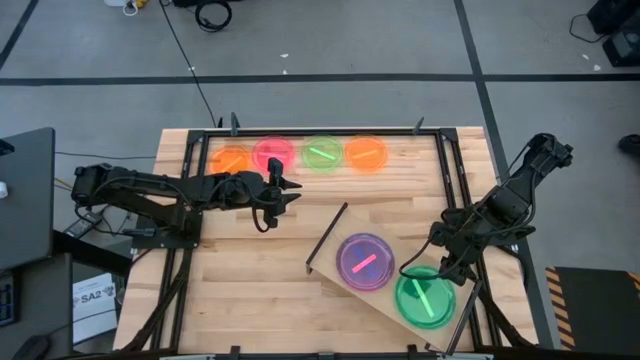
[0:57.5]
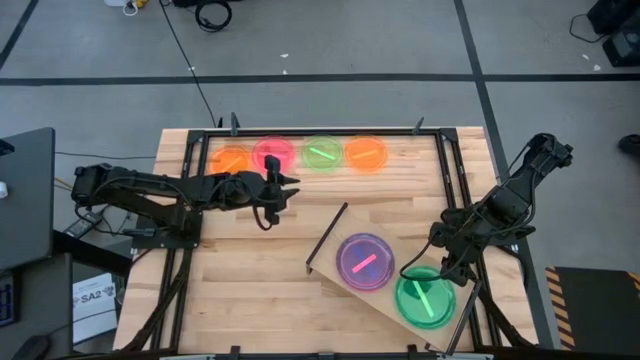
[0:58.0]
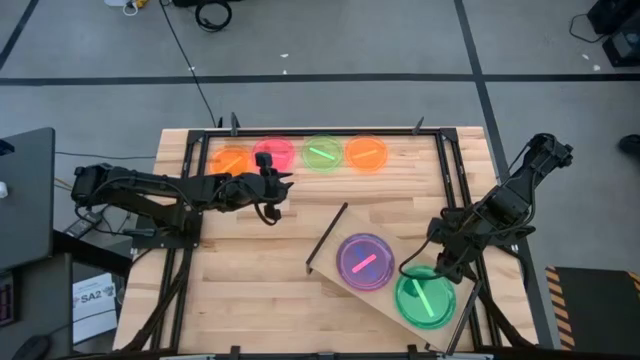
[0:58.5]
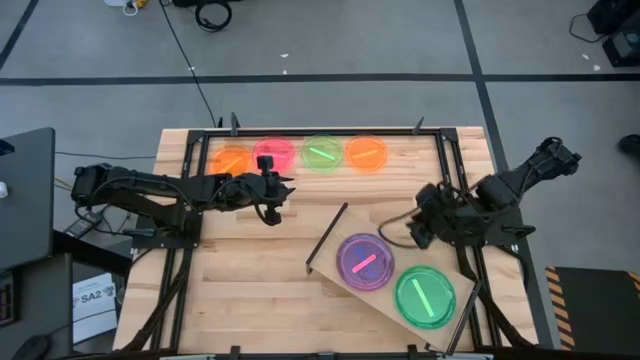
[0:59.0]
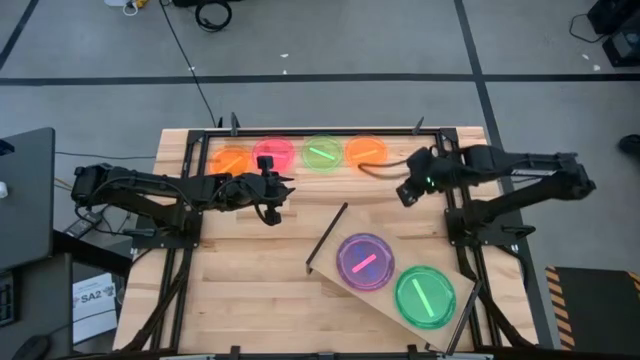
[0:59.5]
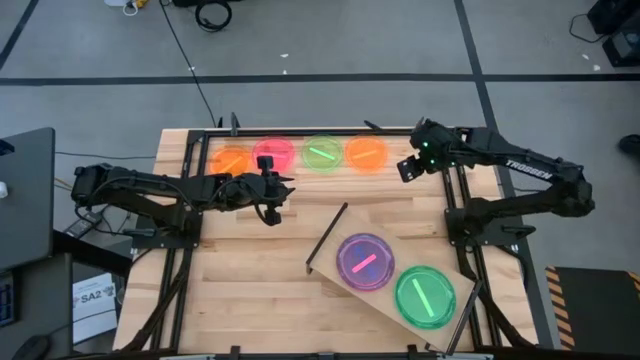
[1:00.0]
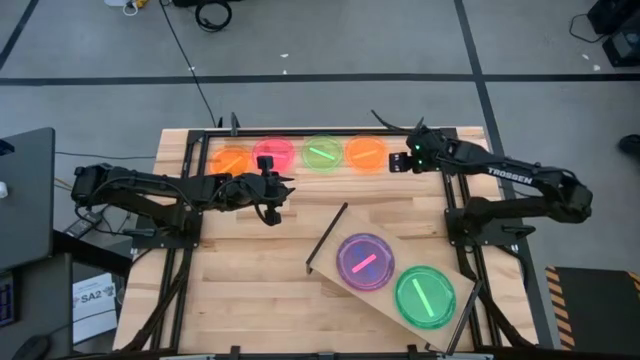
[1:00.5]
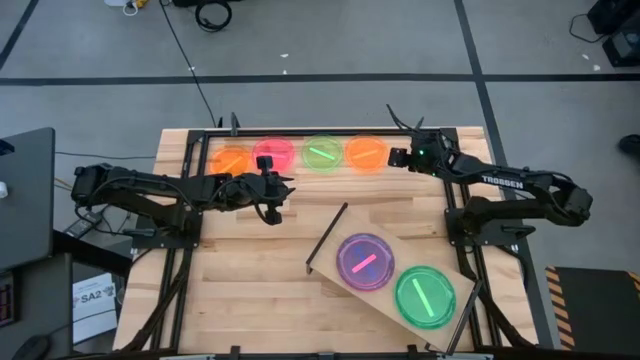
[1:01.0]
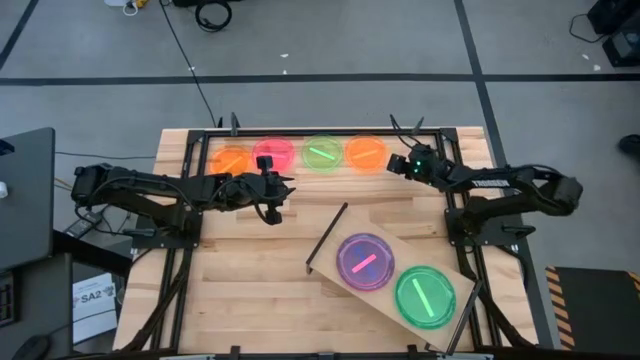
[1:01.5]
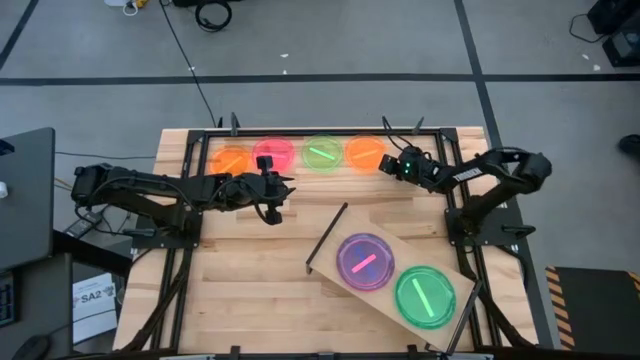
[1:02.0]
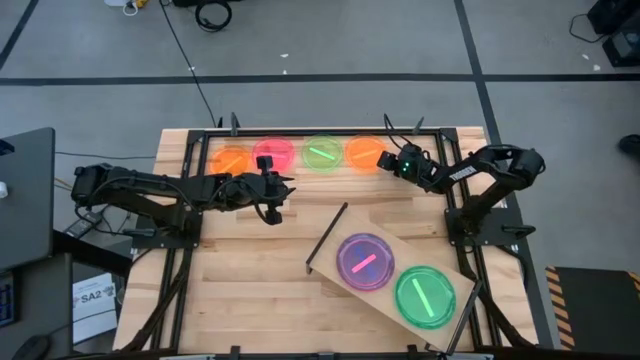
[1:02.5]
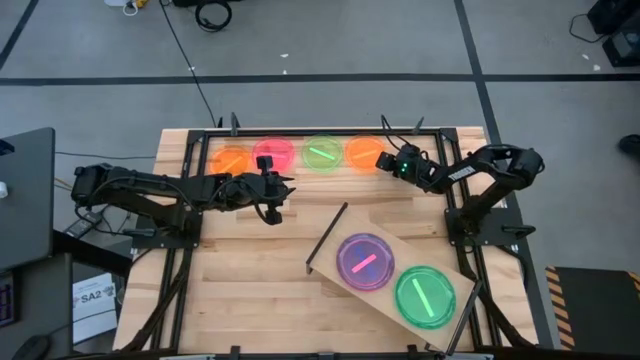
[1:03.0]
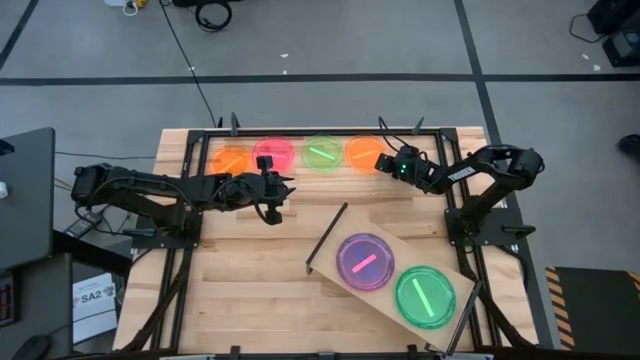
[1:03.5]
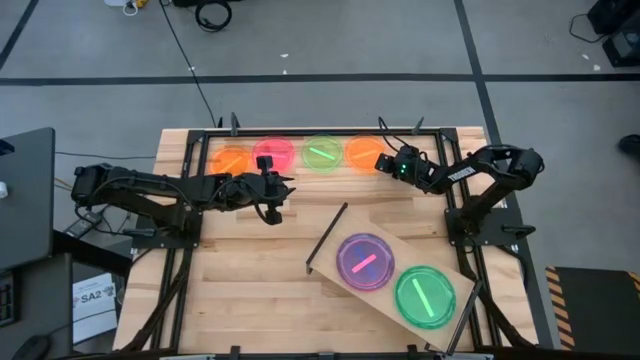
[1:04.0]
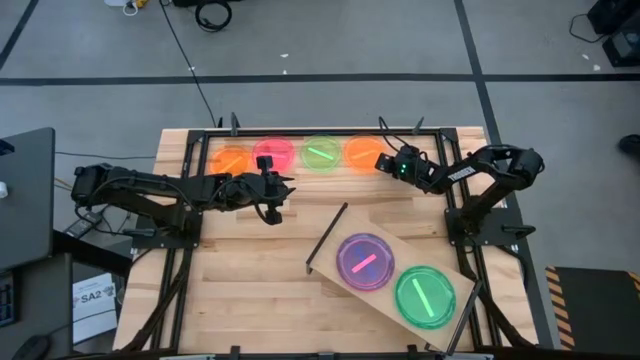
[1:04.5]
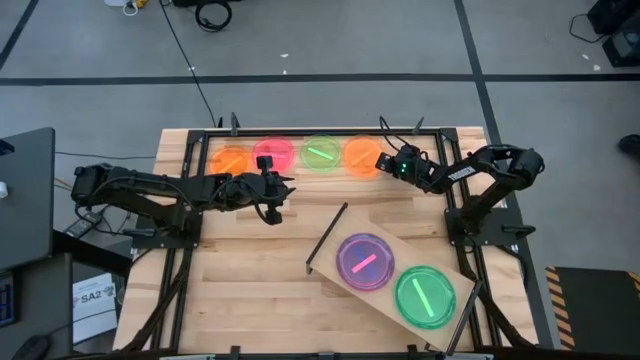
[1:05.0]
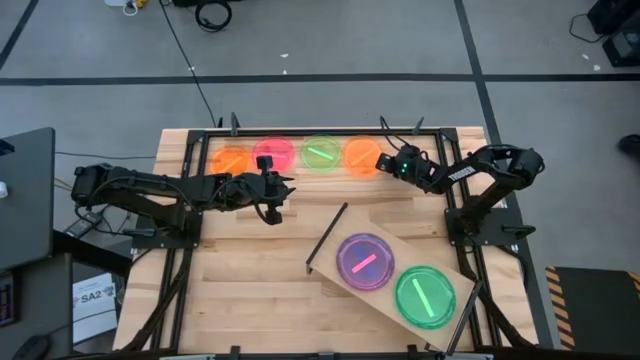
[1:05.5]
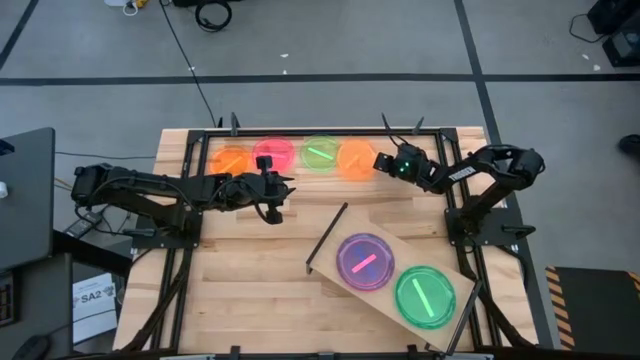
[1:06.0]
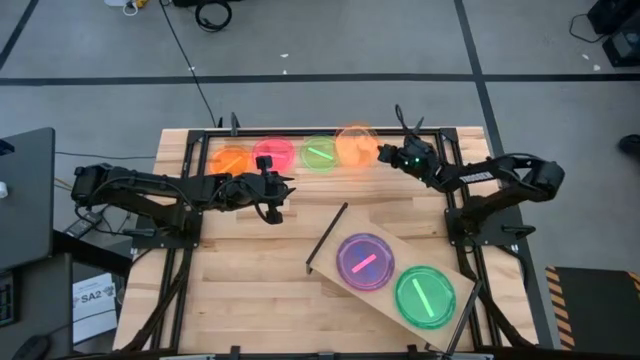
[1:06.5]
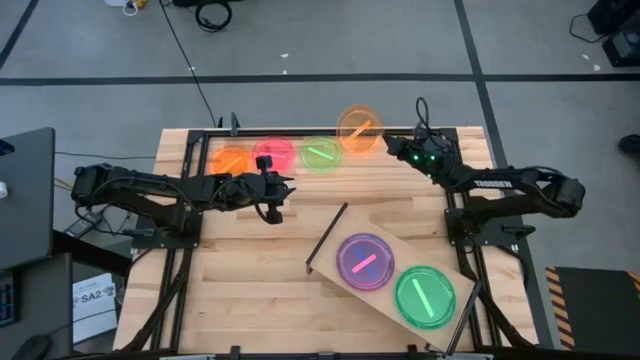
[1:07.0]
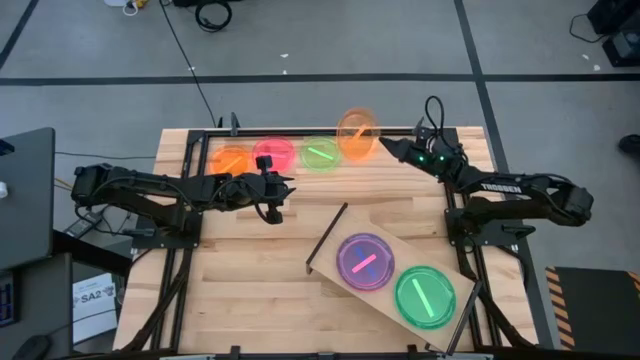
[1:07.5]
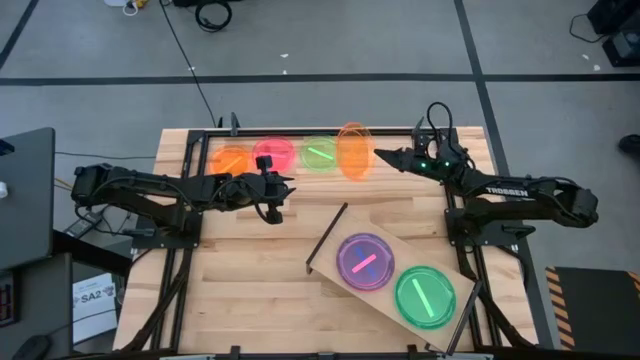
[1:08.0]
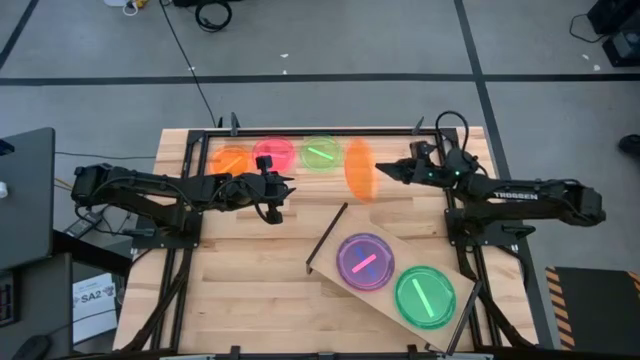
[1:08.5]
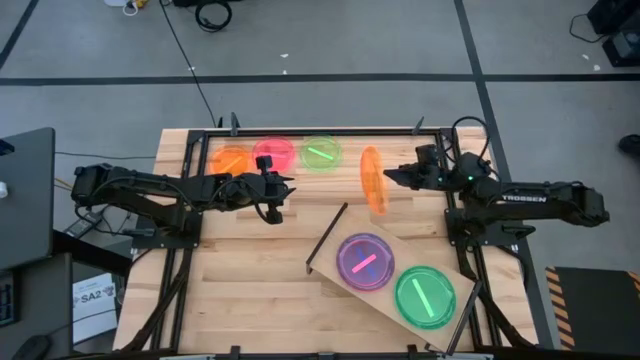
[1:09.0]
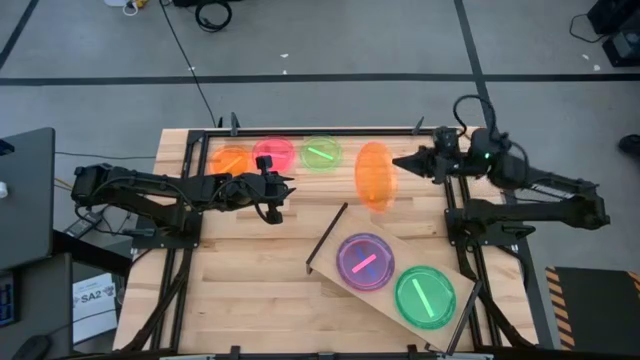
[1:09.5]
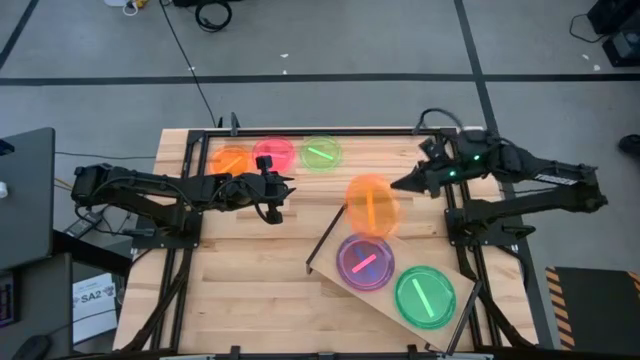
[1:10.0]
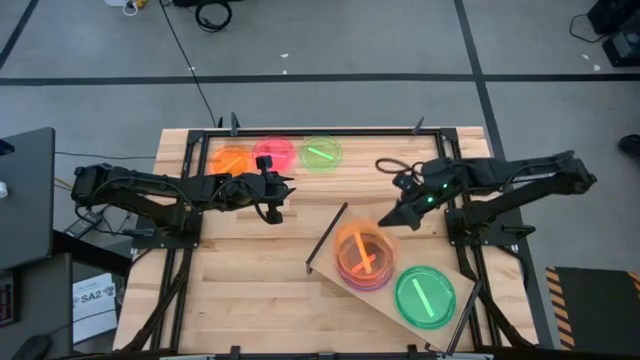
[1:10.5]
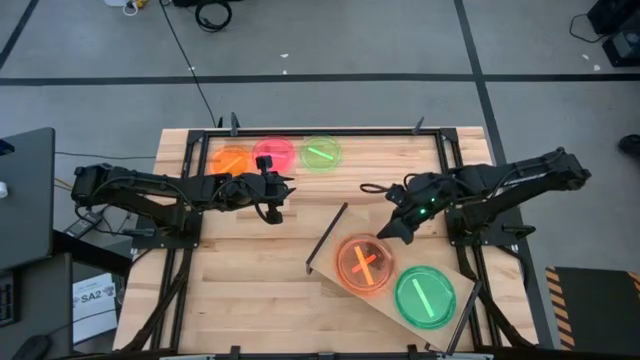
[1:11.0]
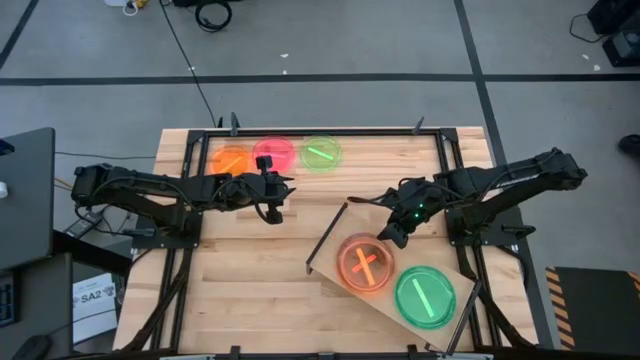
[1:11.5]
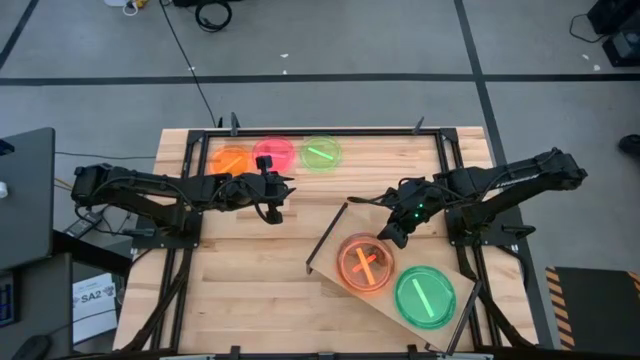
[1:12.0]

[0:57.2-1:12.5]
Task: Place and stack plates onto a shelf
Stack the right transparent orange plate on the transparent pink plate on the shelf

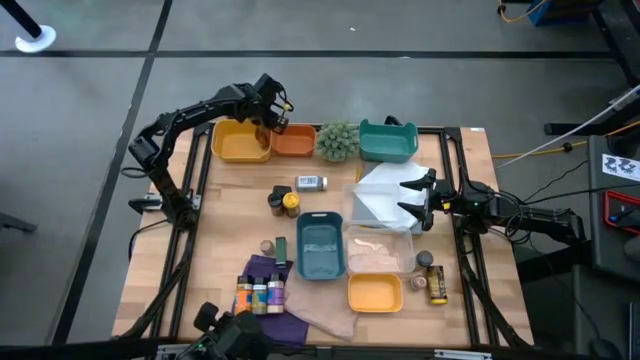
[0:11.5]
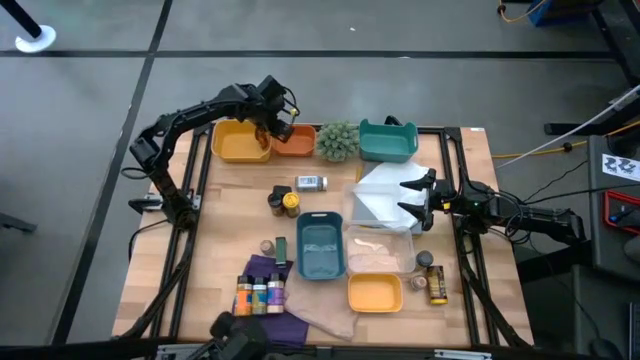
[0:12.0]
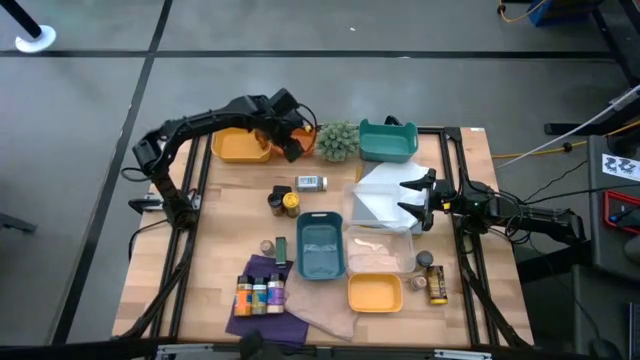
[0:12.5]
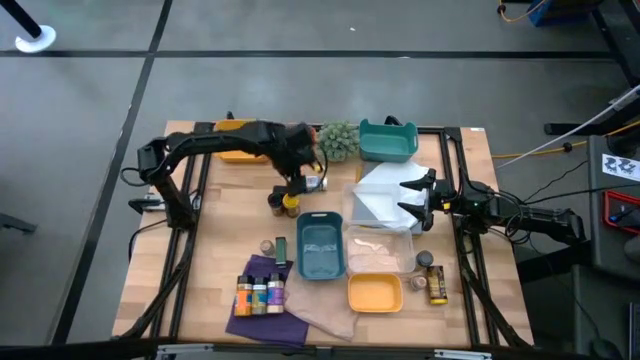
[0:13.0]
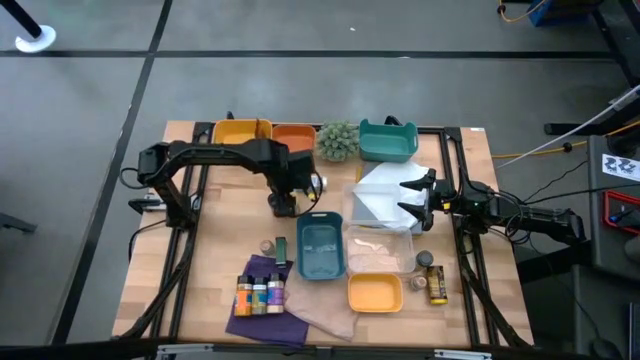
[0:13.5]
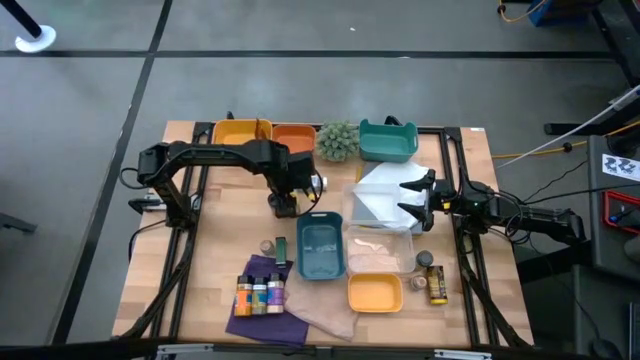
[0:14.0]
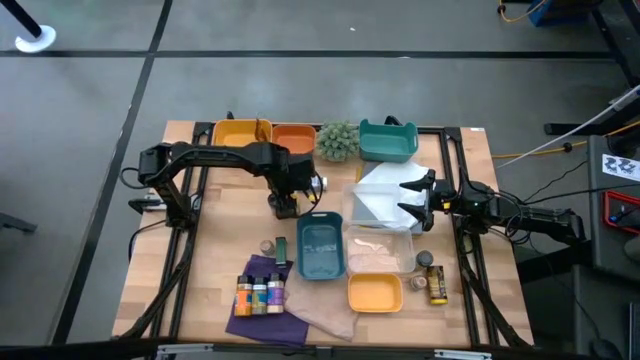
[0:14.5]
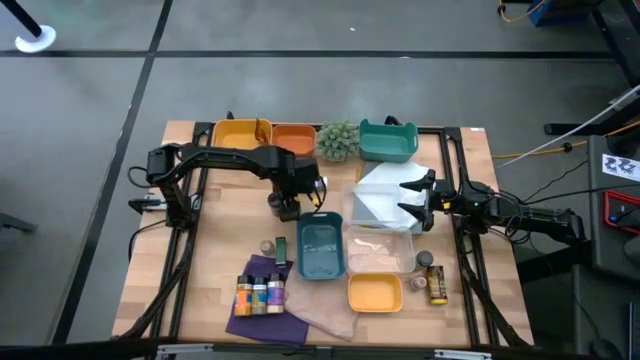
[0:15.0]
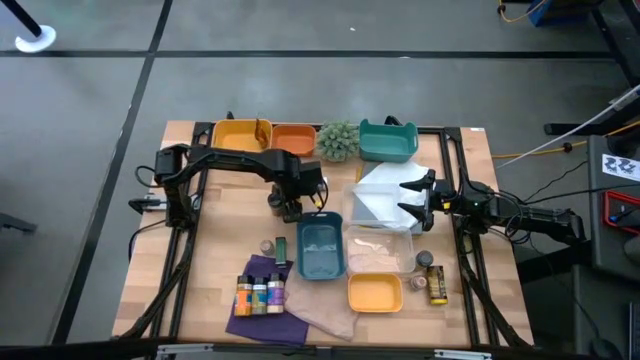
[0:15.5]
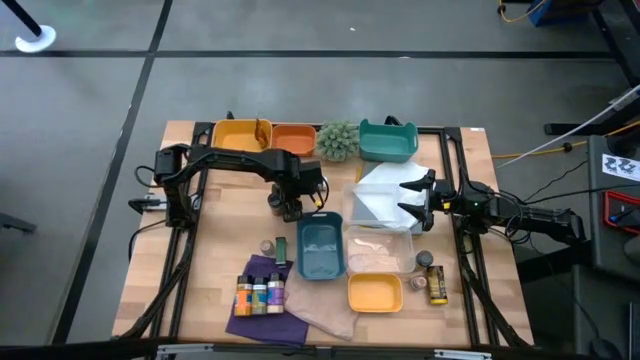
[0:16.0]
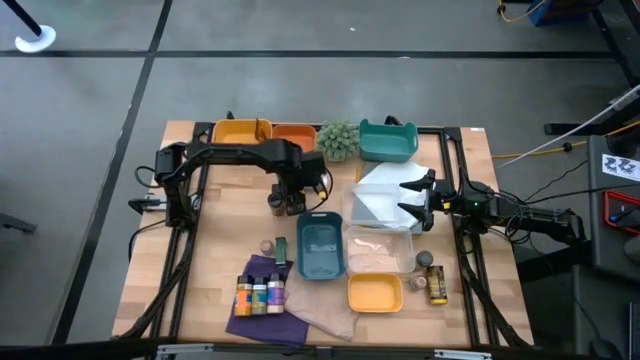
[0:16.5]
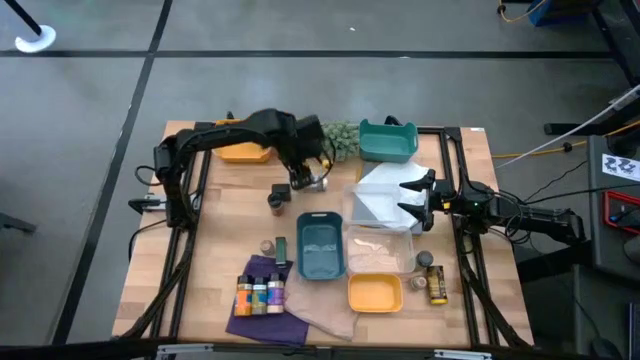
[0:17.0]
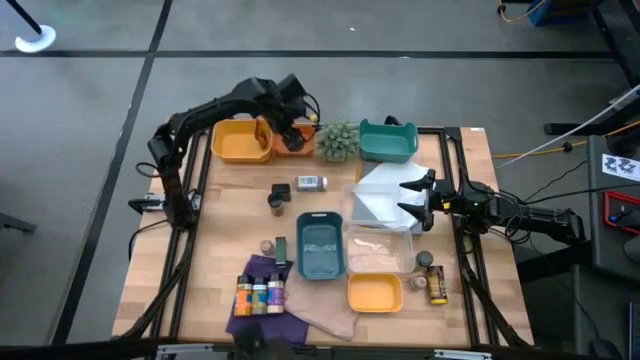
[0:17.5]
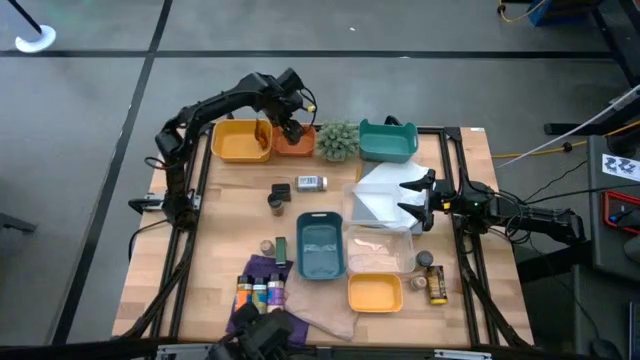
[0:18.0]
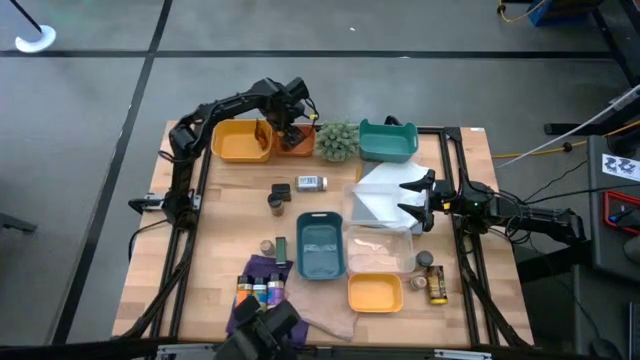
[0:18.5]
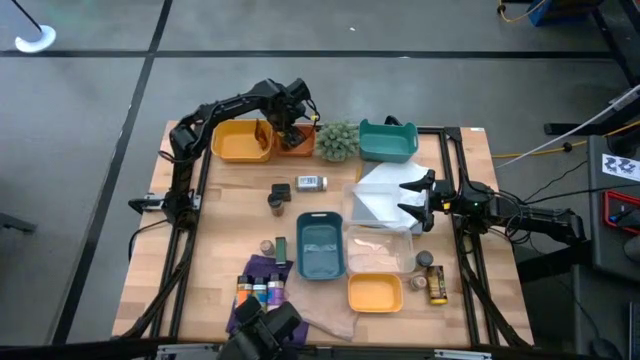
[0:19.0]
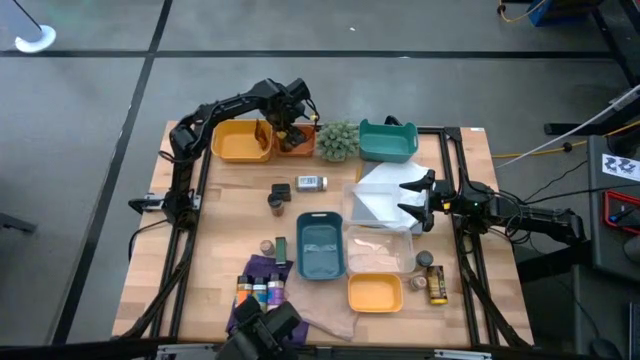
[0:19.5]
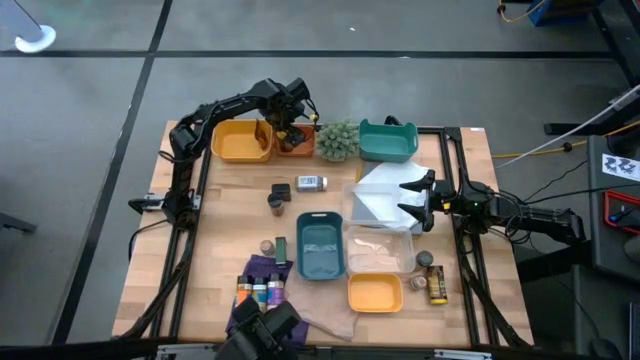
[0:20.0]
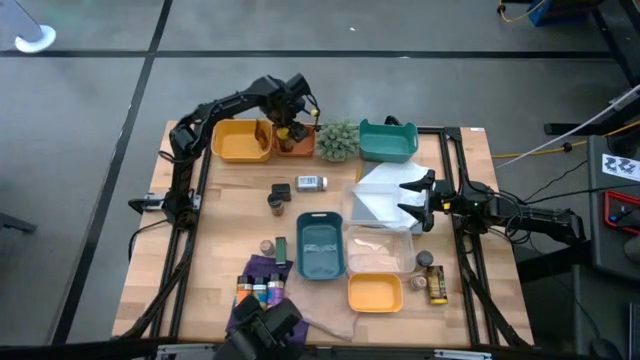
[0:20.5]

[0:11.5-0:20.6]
Task: Sort spices by type
Put the top yellow seasoning bottle into the orange bin
